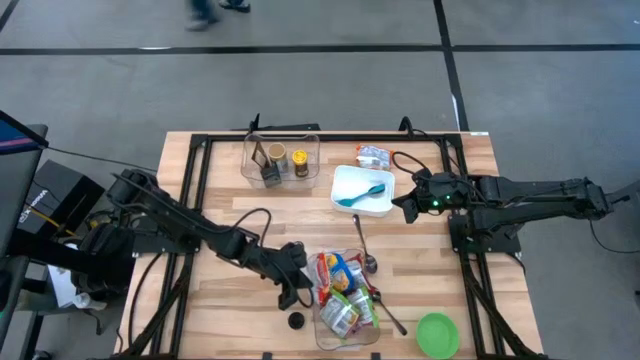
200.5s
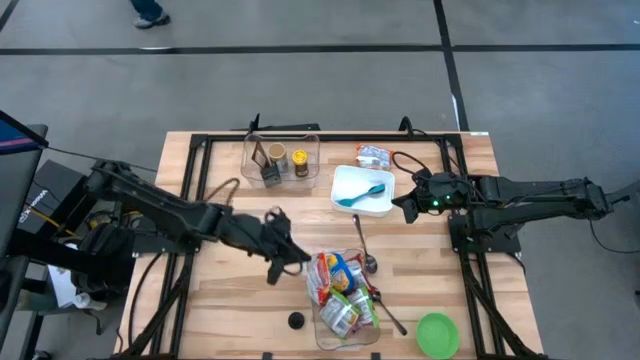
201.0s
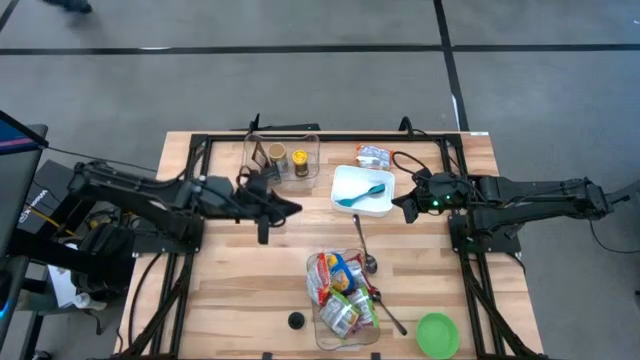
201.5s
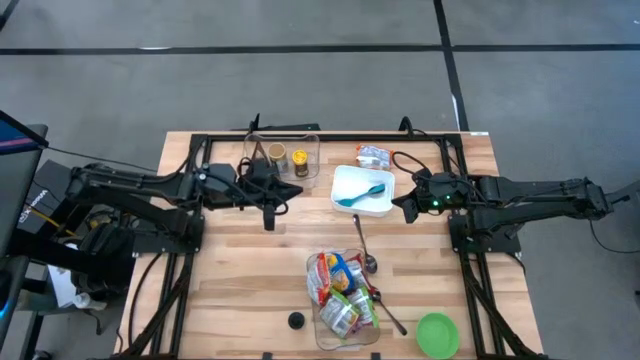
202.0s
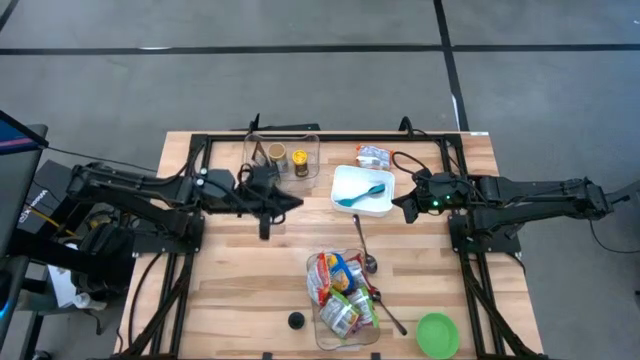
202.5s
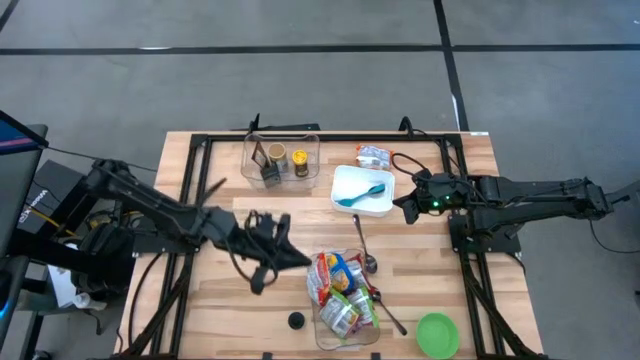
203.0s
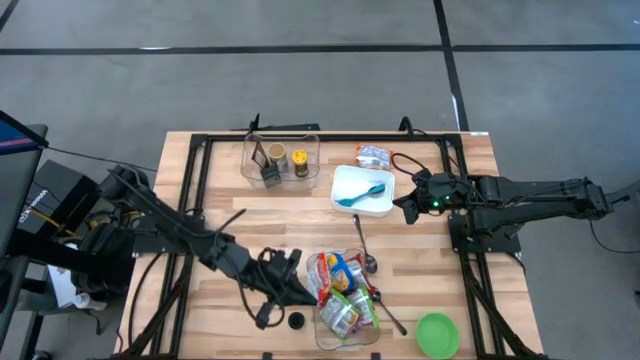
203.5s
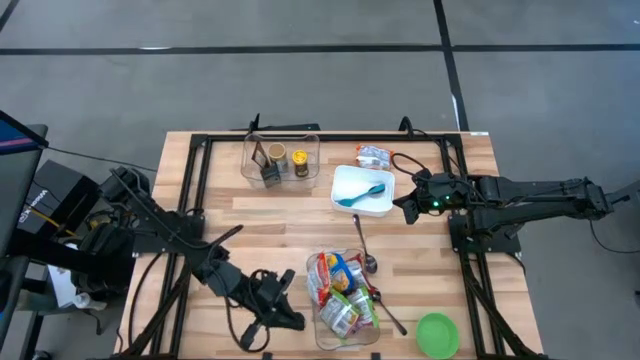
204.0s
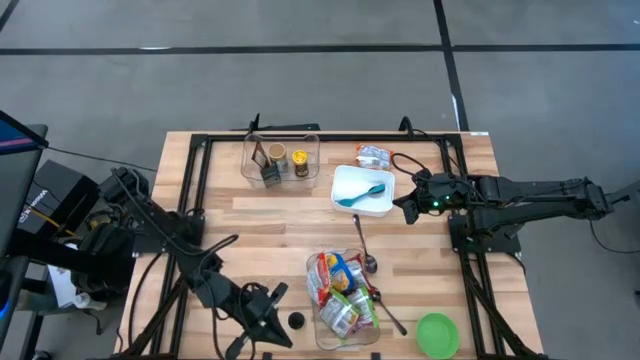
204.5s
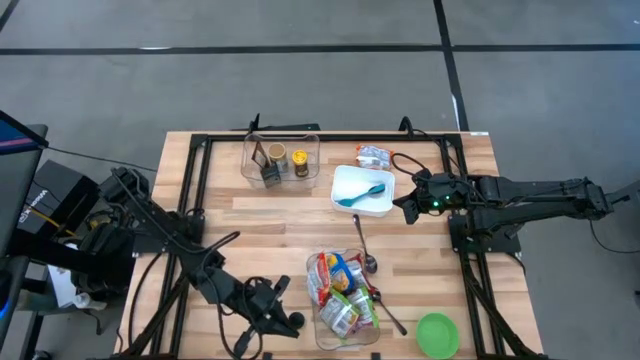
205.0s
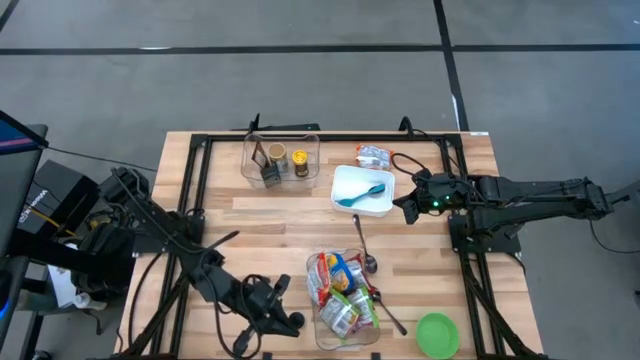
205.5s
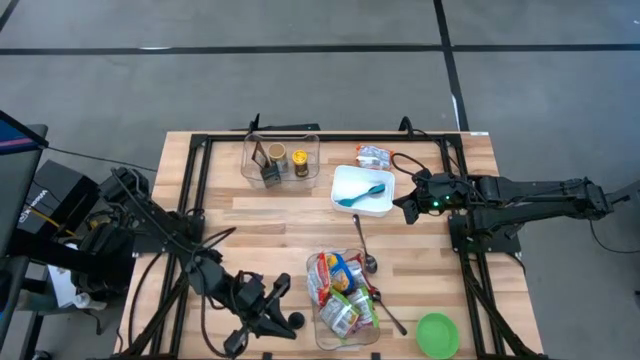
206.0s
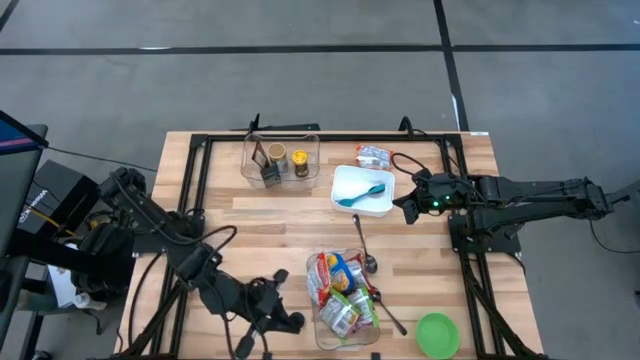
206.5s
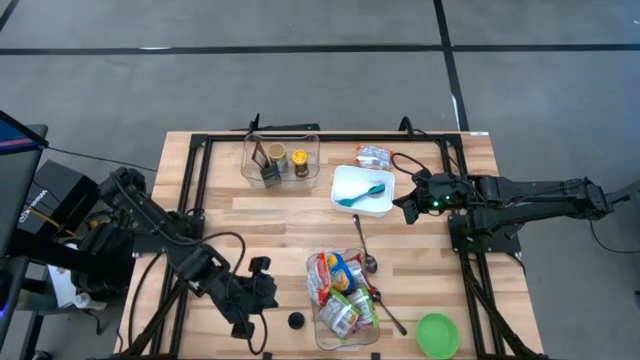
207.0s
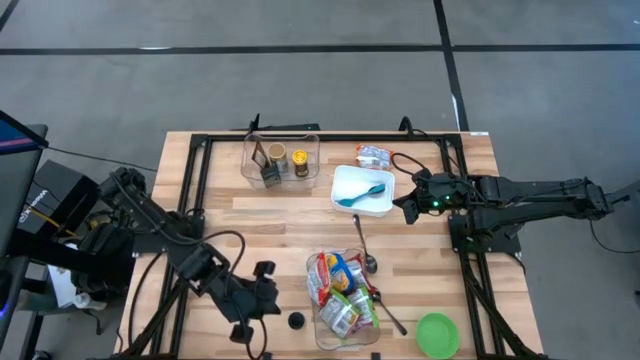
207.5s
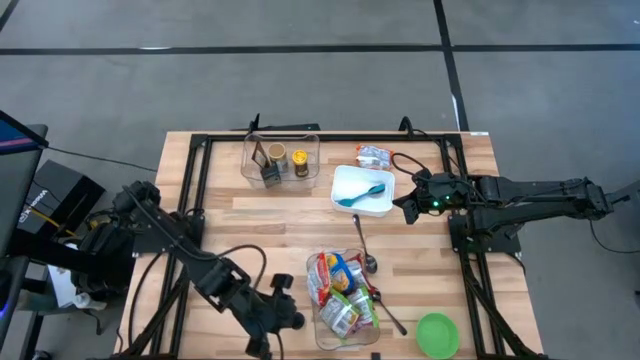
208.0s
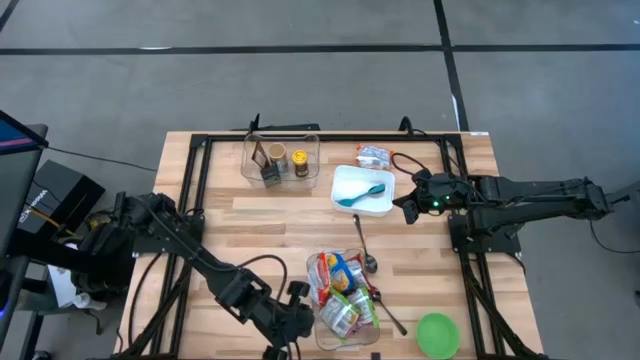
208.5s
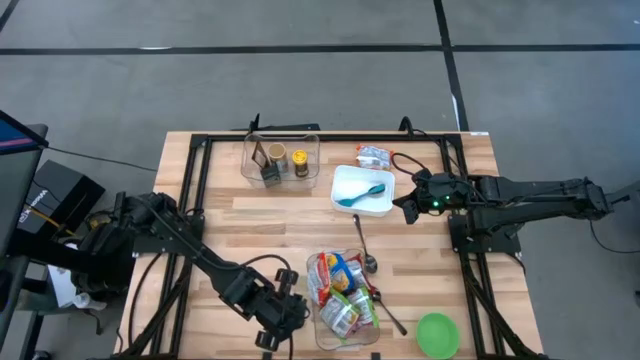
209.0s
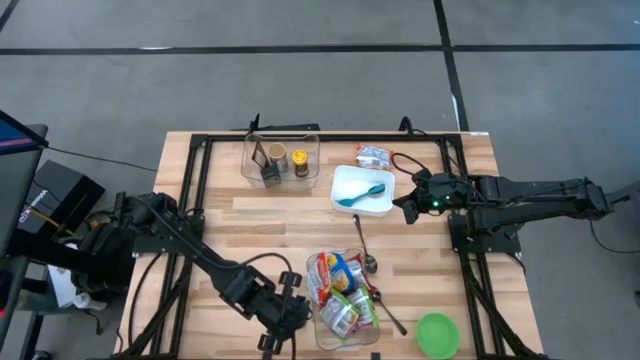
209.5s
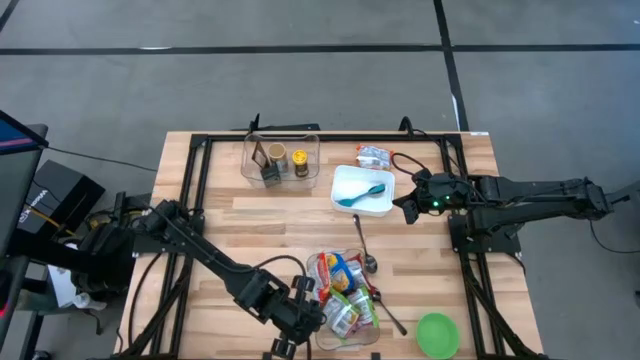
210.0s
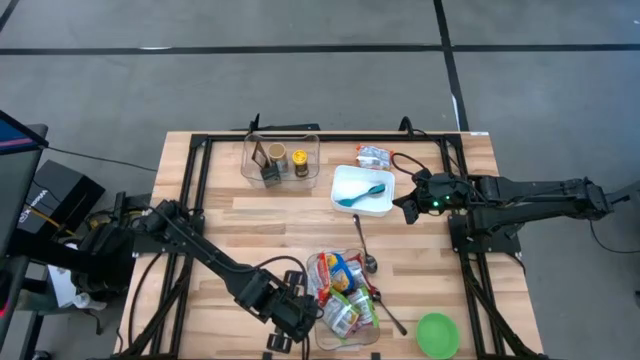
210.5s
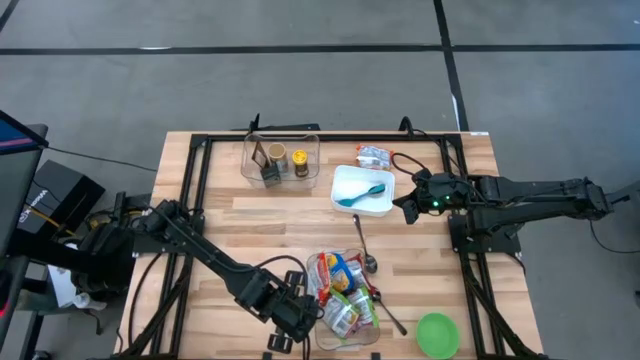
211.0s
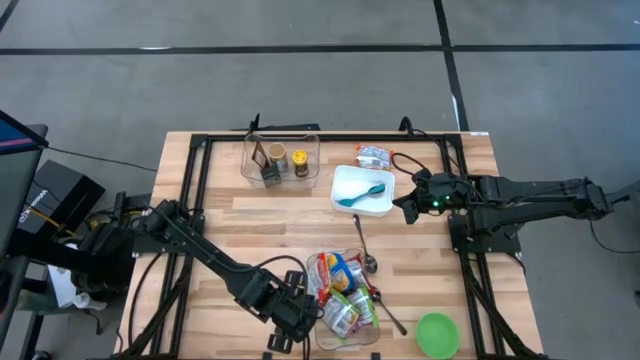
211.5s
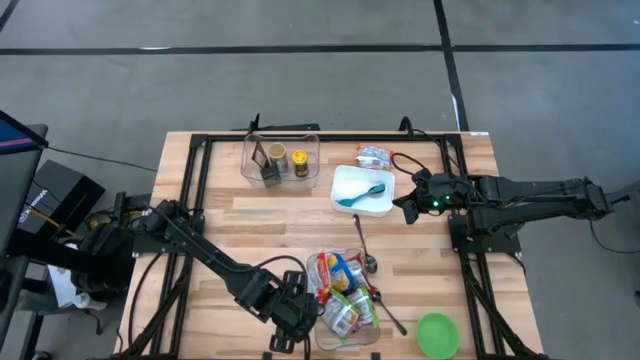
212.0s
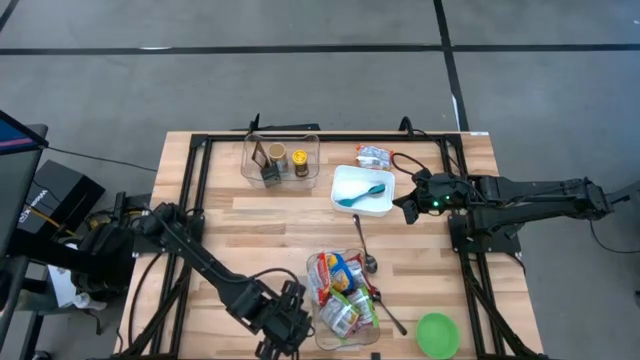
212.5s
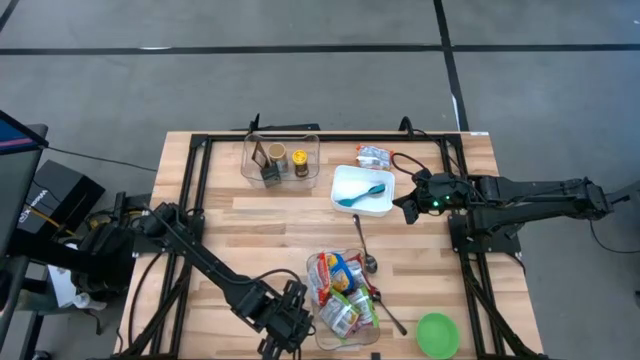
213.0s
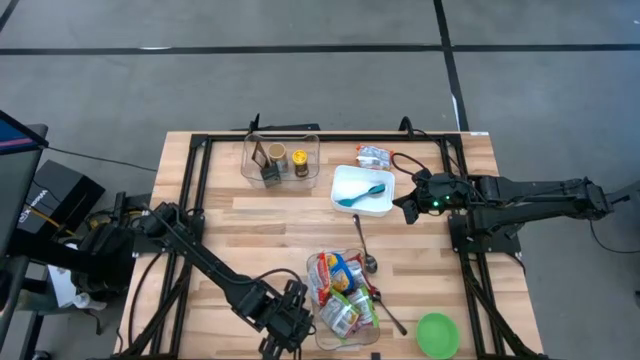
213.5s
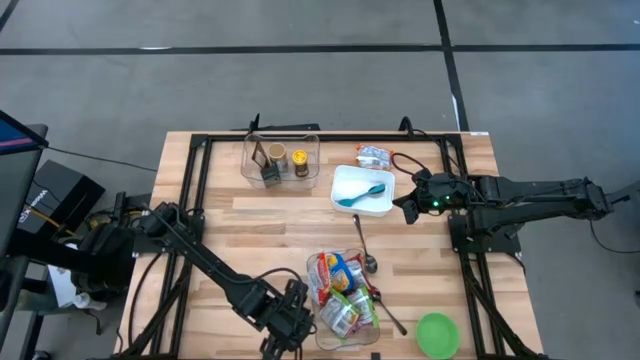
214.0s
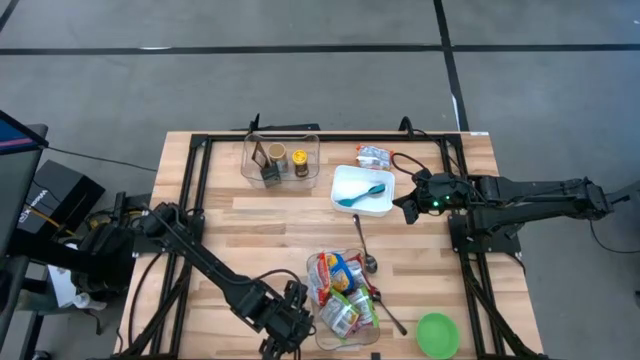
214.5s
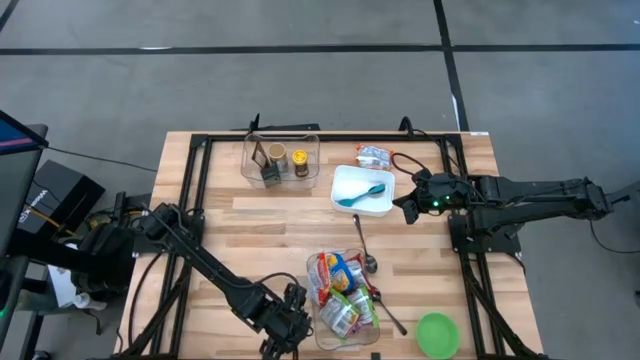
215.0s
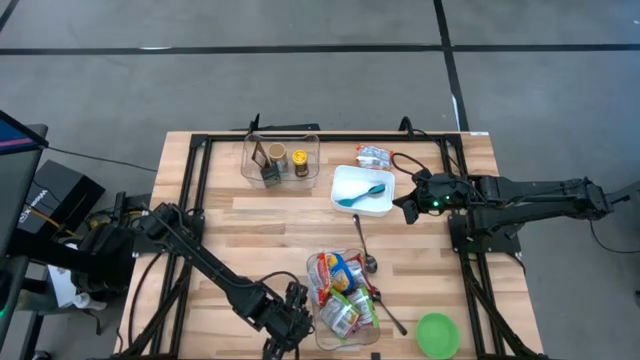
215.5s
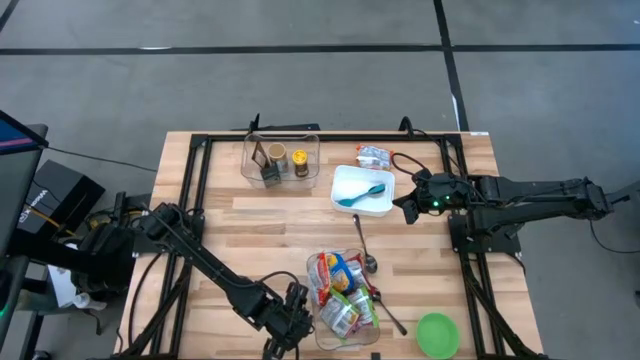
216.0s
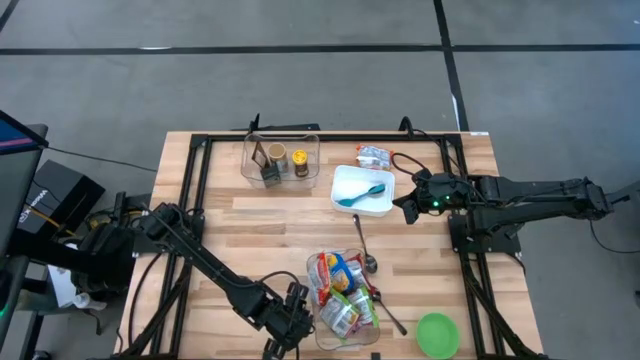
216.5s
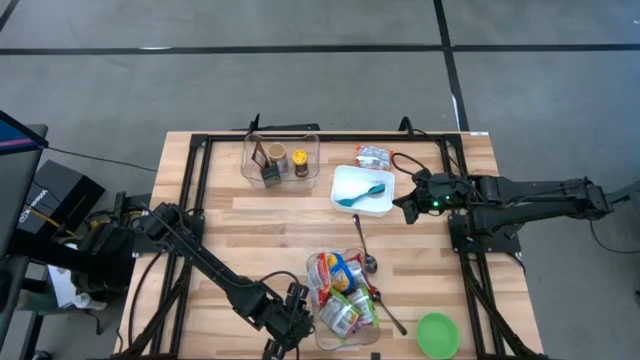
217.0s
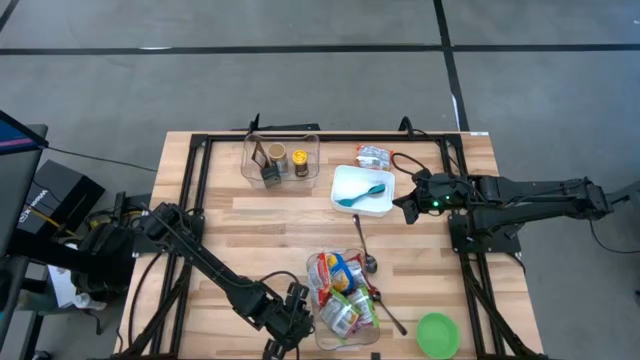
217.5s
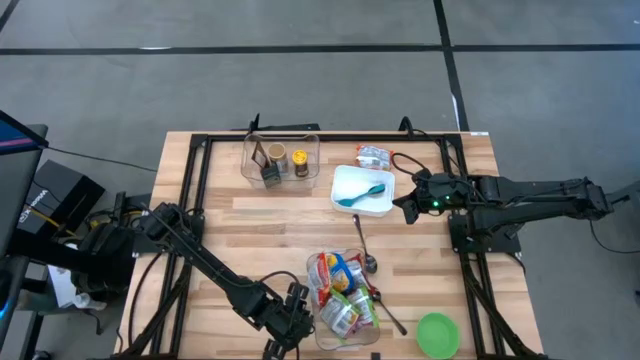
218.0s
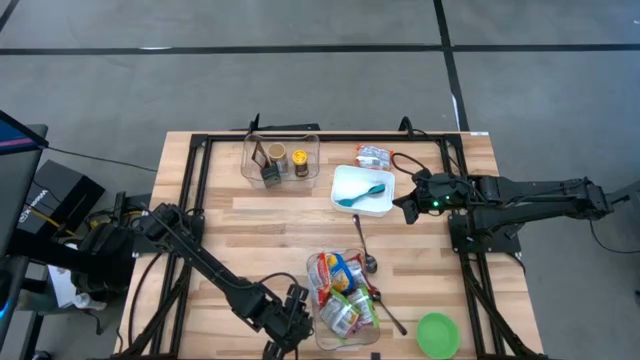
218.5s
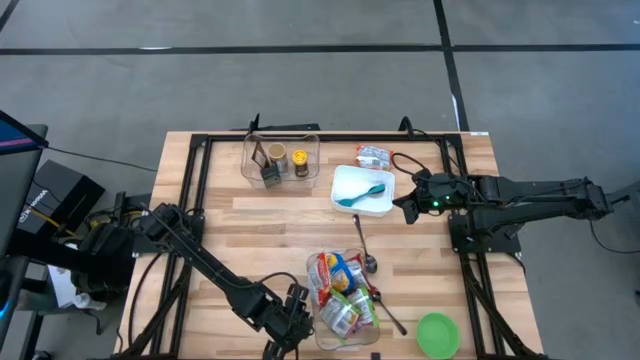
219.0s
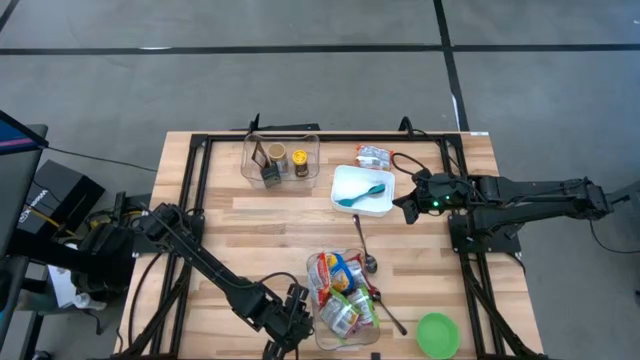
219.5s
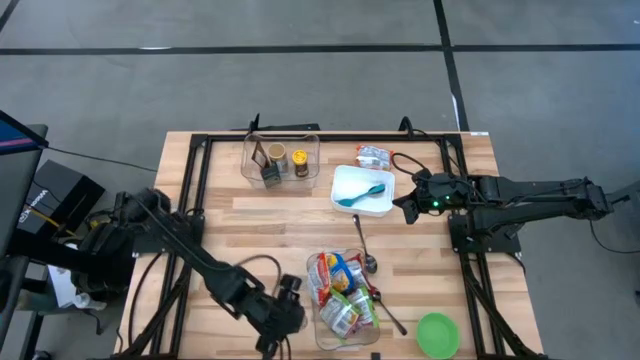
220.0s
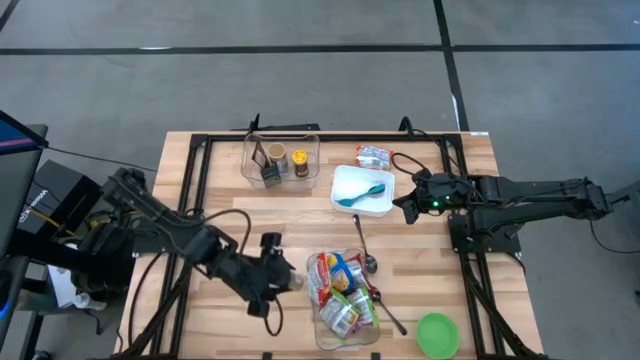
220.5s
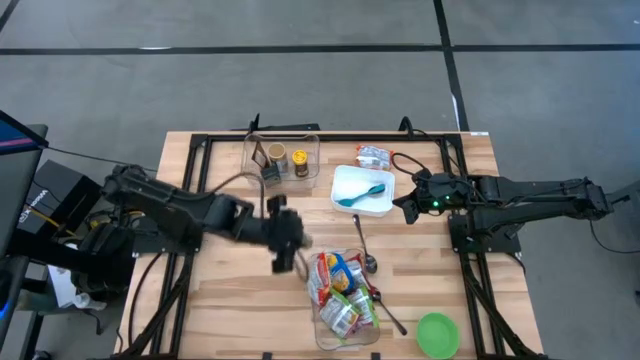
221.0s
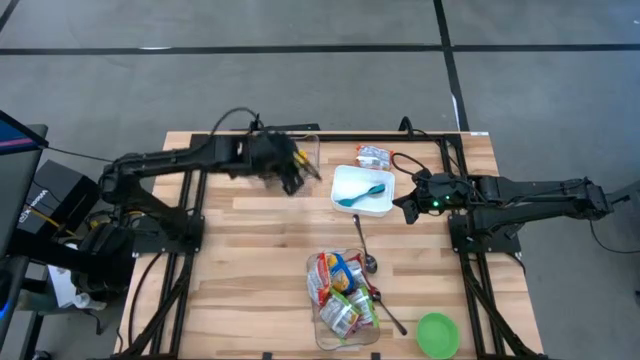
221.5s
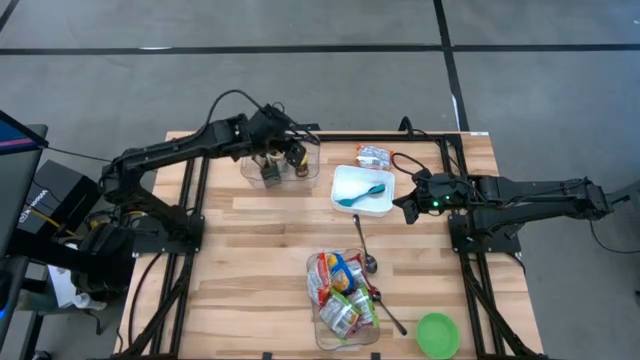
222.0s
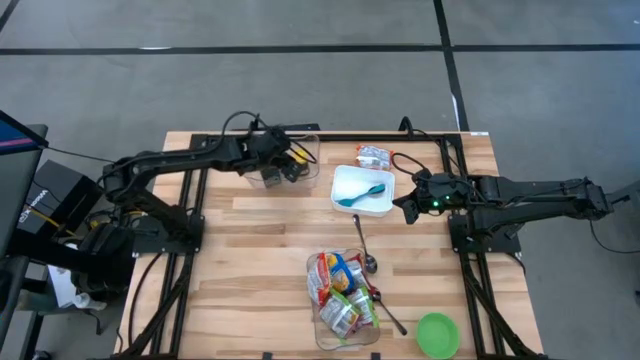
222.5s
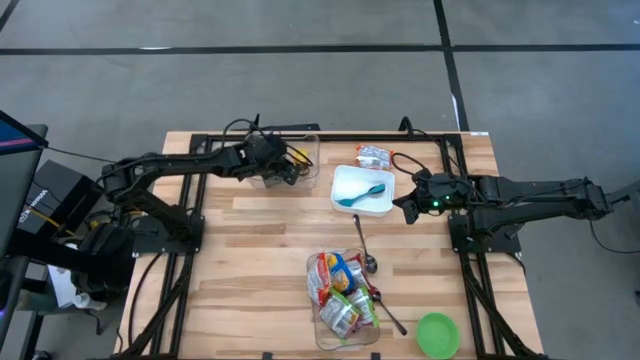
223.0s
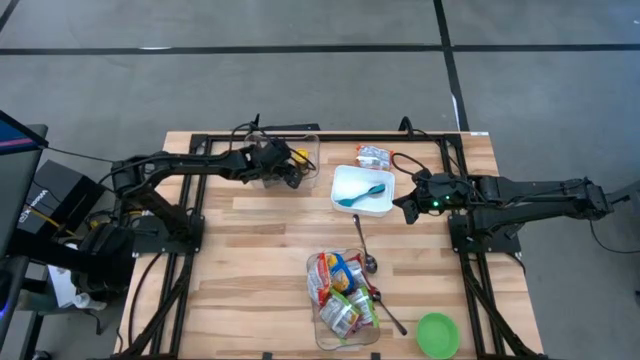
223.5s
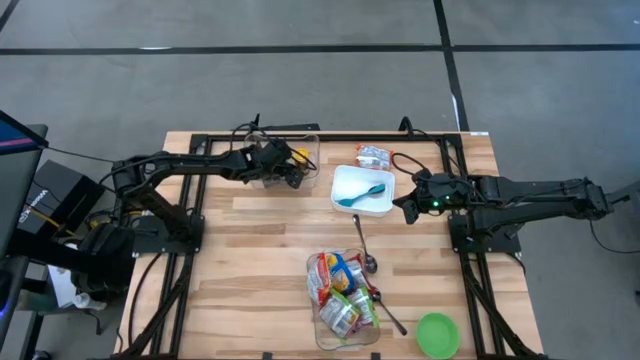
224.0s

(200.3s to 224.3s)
Task: Pick & Place Food Item
Put the black seasoning bottle into the top transparent bin
